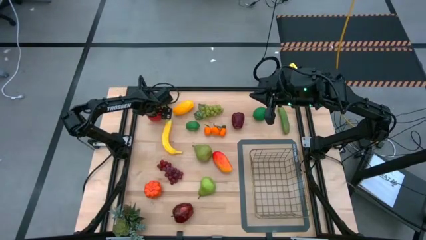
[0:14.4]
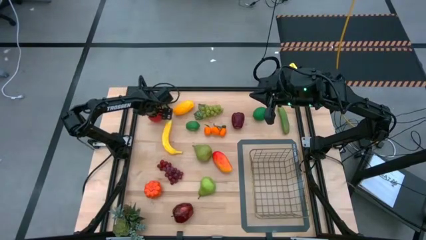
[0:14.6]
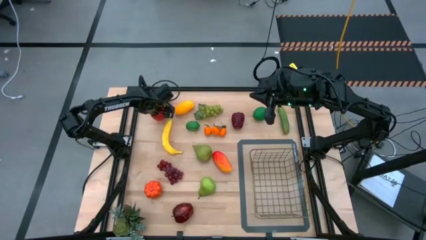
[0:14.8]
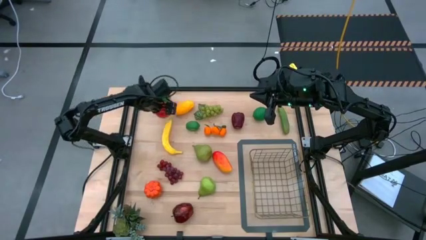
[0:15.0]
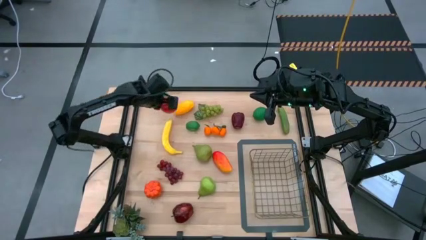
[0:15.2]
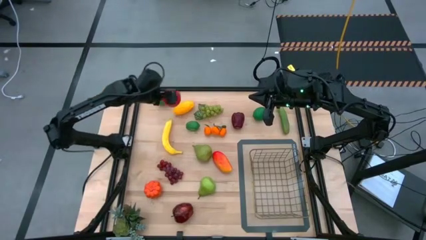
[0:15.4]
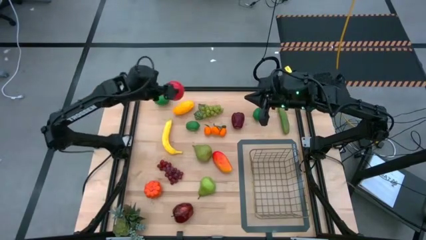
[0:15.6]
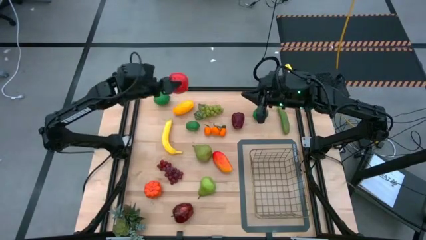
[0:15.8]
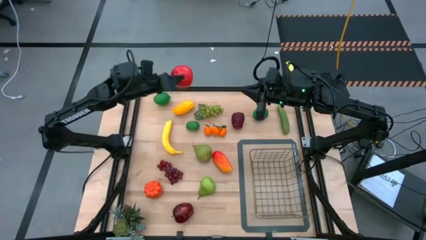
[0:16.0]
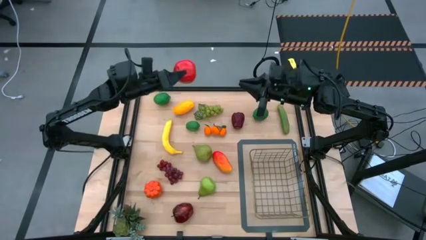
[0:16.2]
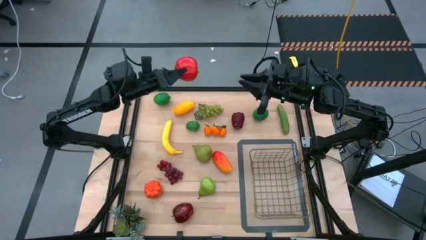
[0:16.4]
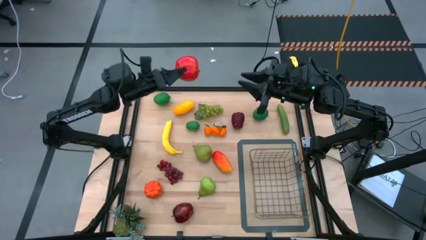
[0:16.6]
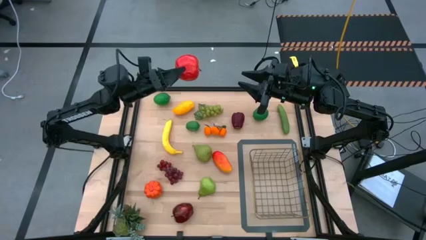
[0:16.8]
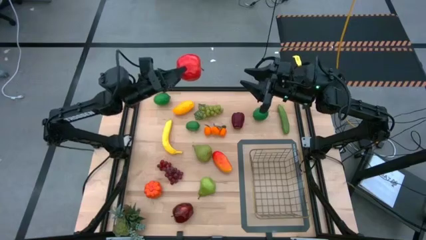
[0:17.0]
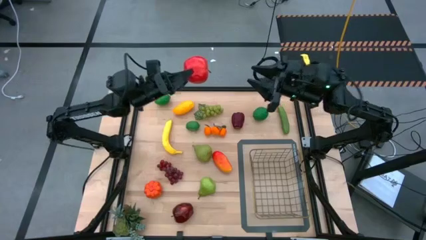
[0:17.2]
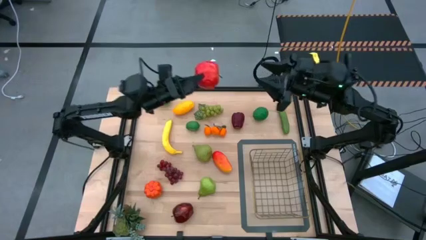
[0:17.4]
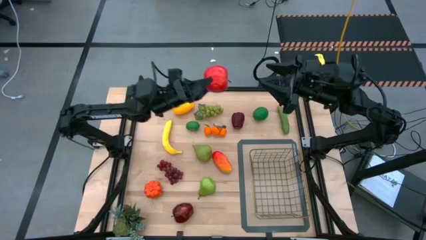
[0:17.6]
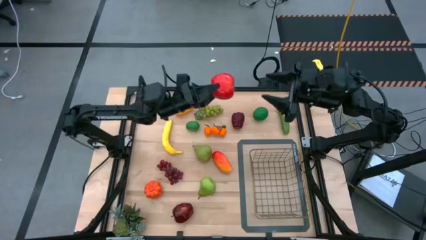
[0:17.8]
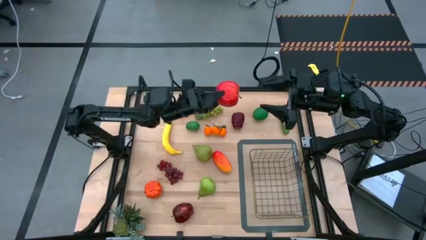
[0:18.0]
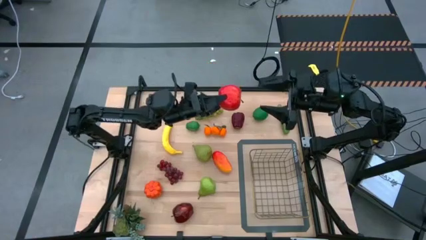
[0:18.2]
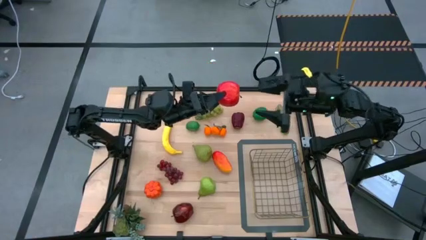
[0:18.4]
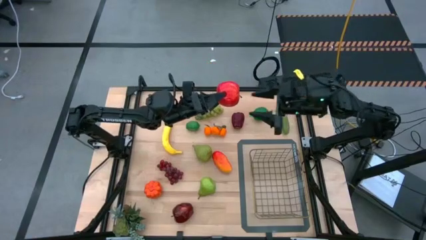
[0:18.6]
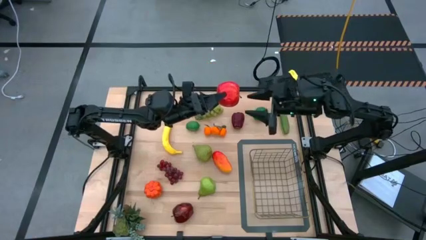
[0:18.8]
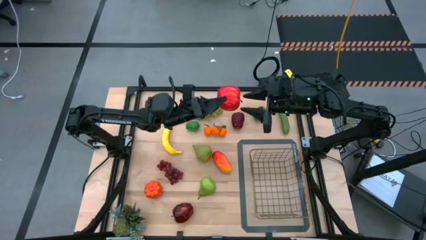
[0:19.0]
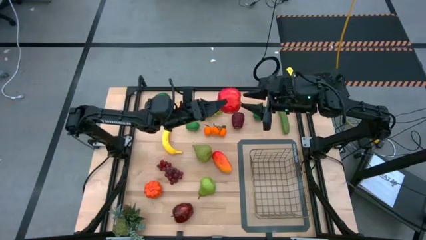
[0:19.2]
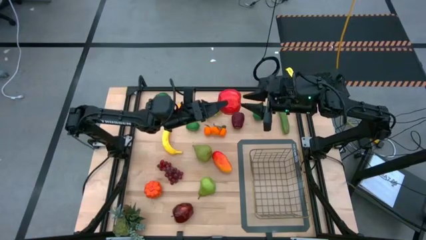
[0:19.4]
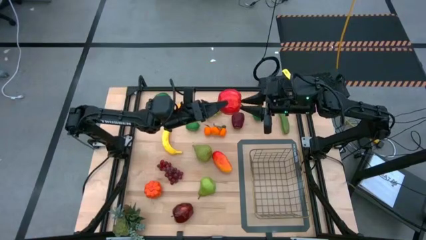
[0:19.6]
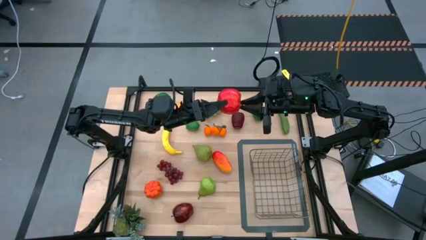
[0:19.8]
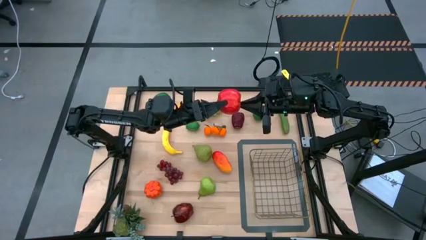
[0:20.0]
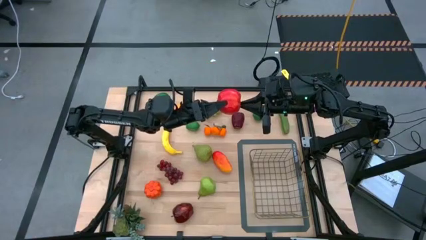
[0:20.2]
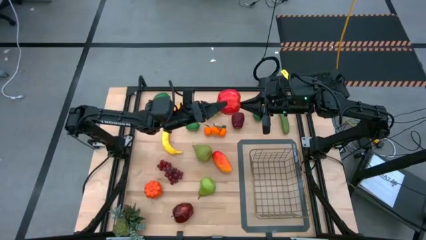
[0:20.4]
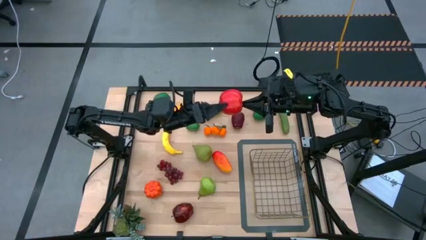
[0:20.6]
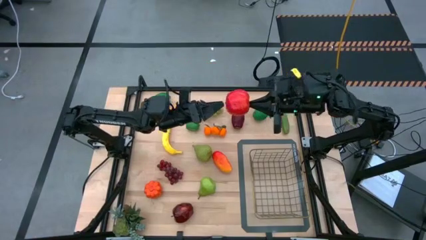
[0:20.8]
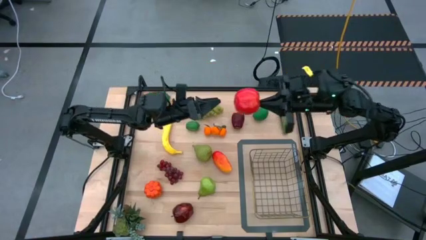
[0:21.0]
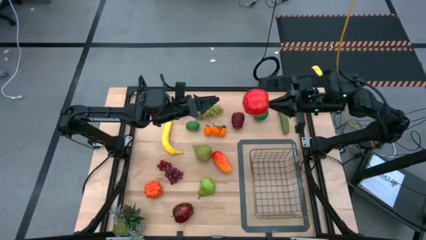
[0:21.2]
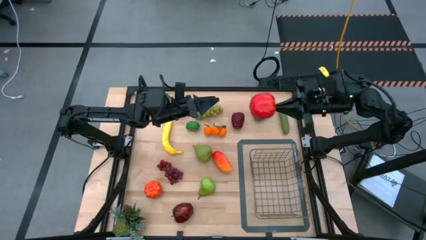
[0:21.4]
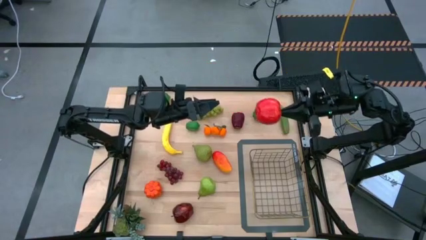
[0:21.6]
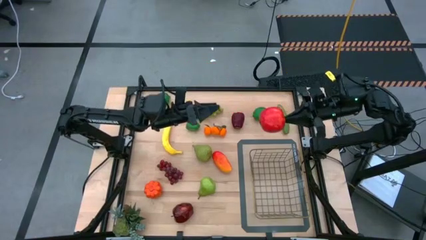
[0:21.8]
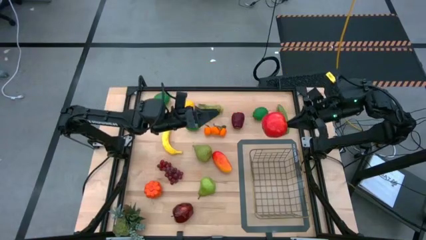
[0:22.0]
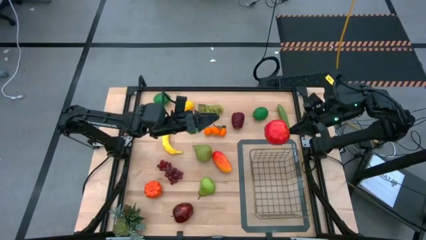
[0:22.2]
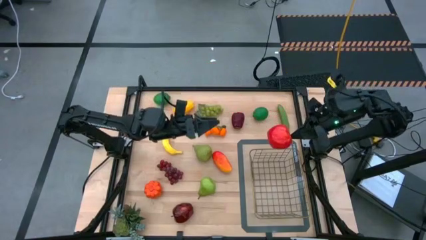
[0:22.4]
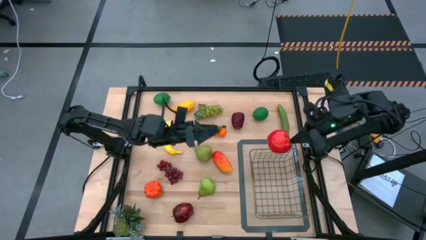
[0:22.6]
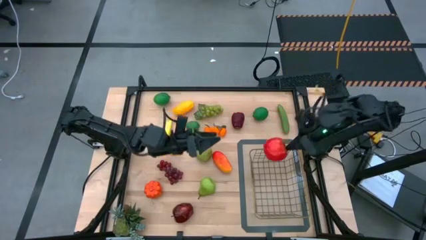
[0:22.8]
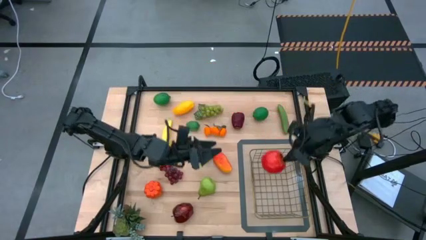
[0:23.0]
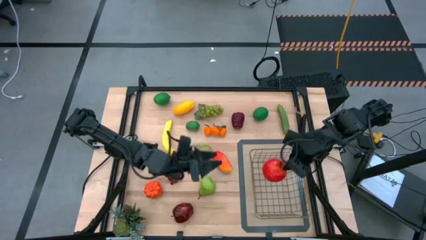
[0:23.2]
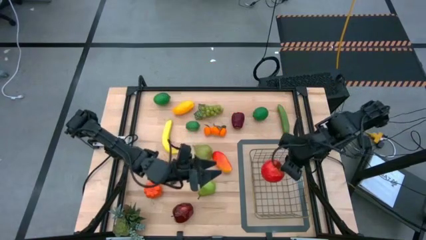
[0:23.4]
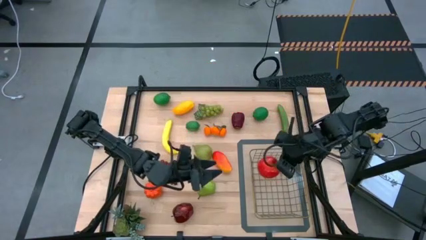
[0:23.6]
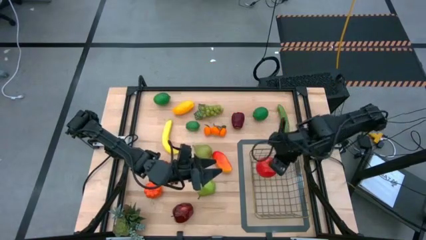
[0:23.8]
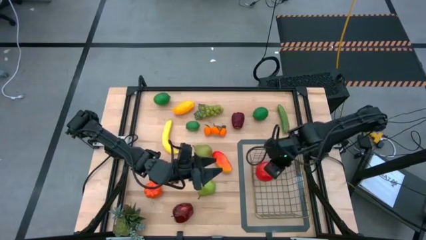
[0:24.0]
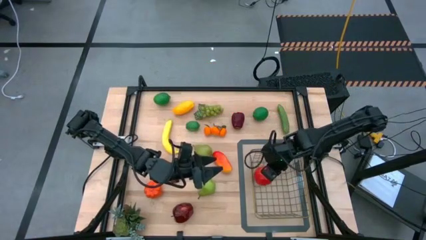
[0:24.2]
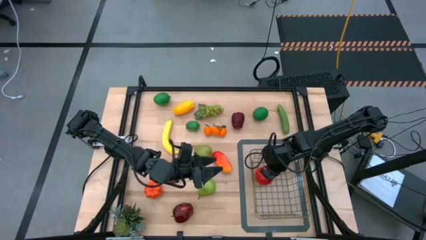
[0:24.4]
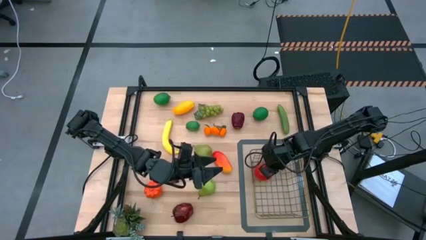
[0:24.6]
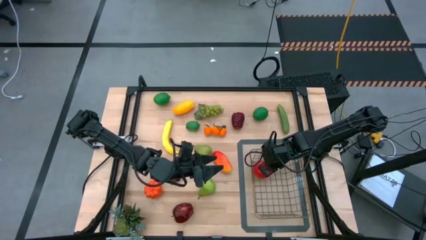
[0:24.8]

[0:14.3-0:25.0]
Task: Build produce basket
Put the red apple into the wire basket

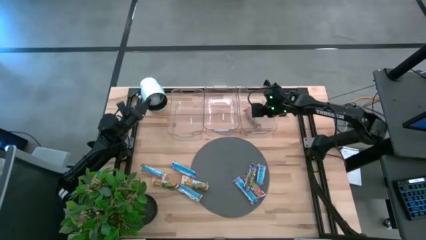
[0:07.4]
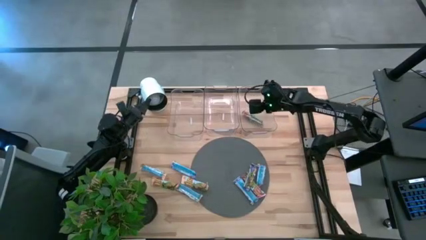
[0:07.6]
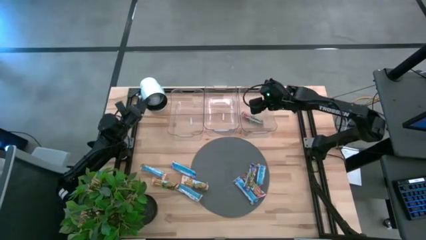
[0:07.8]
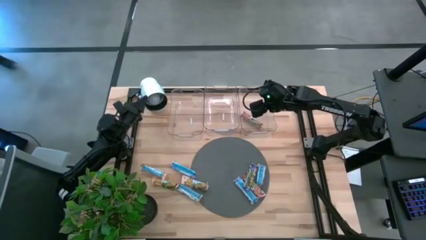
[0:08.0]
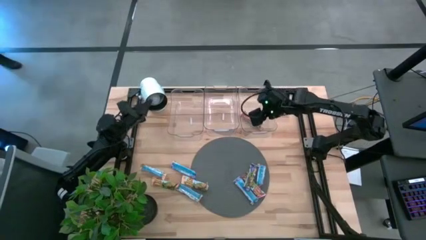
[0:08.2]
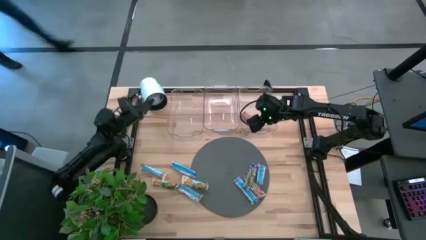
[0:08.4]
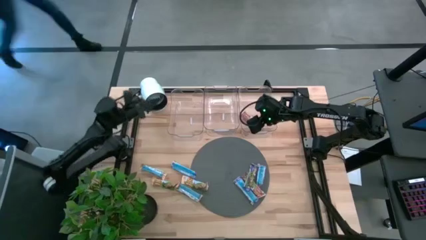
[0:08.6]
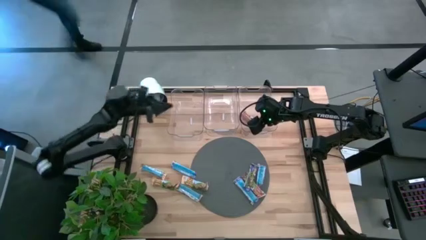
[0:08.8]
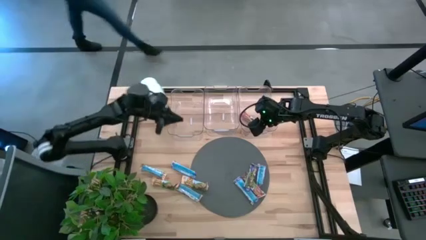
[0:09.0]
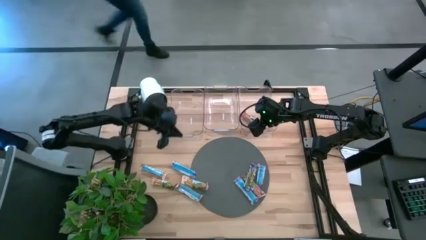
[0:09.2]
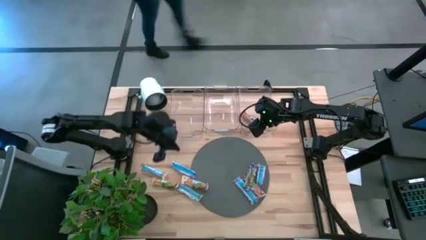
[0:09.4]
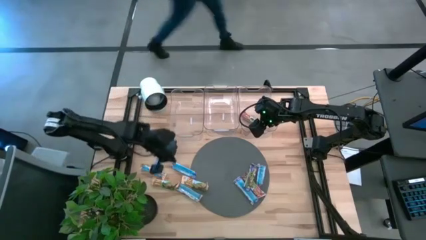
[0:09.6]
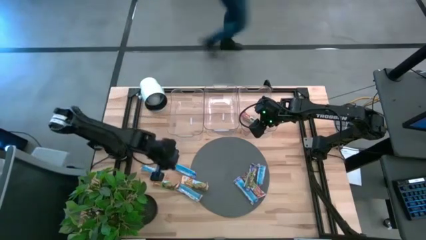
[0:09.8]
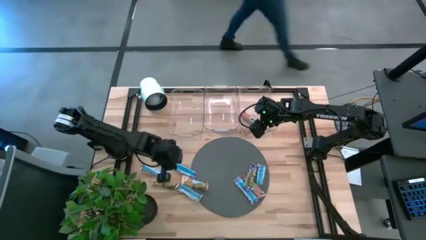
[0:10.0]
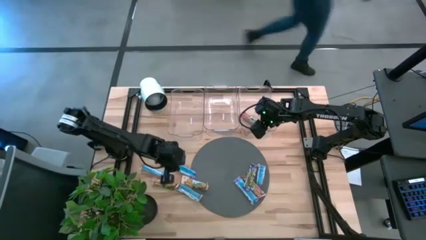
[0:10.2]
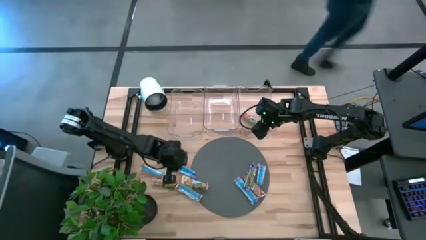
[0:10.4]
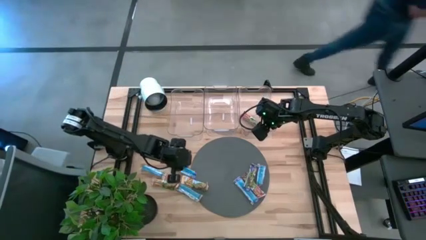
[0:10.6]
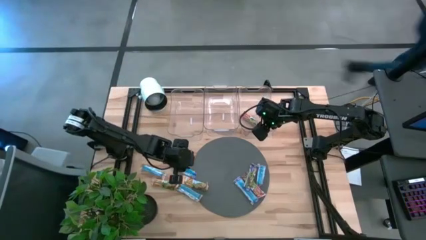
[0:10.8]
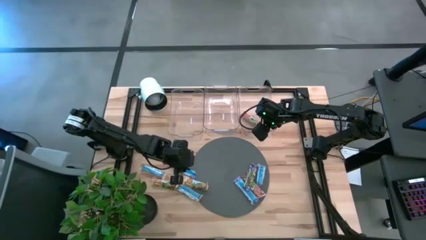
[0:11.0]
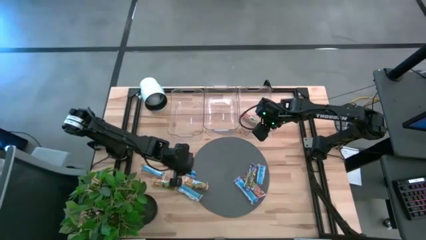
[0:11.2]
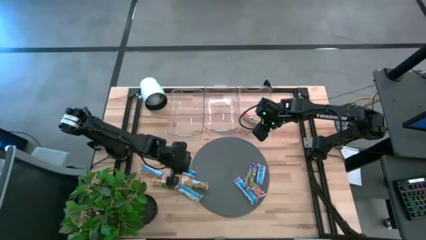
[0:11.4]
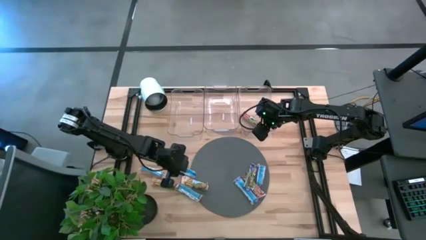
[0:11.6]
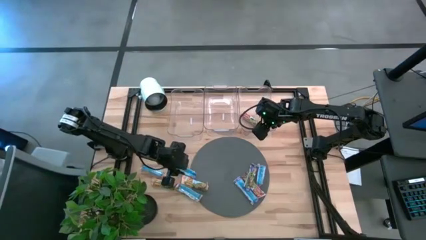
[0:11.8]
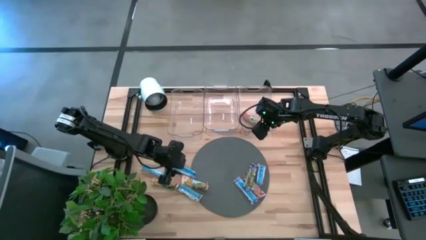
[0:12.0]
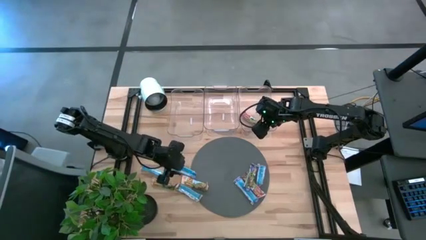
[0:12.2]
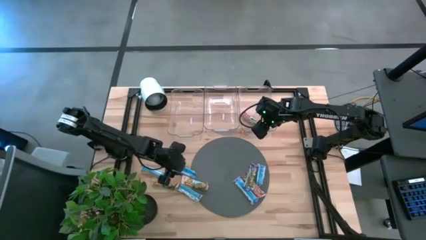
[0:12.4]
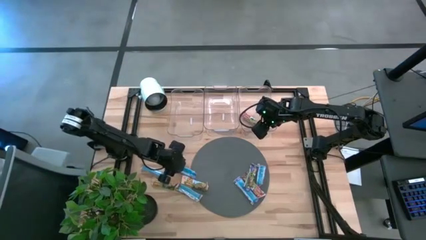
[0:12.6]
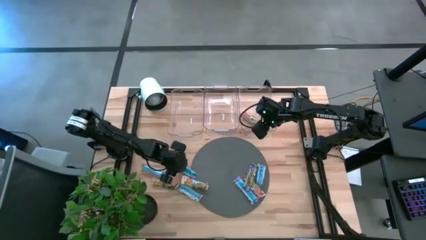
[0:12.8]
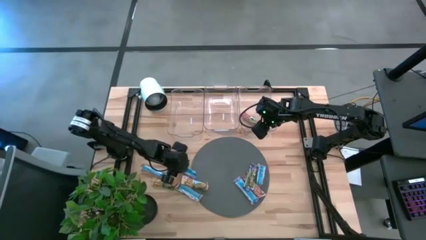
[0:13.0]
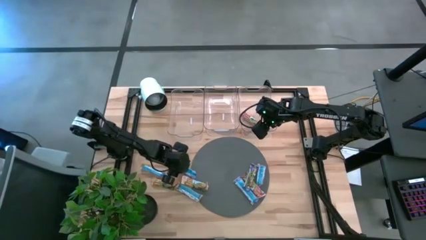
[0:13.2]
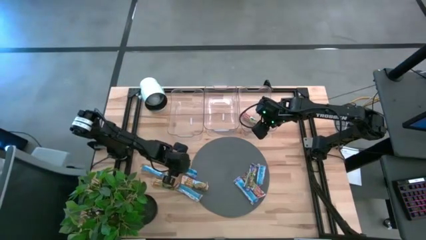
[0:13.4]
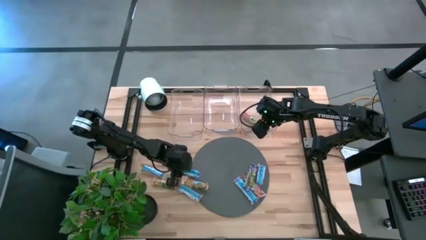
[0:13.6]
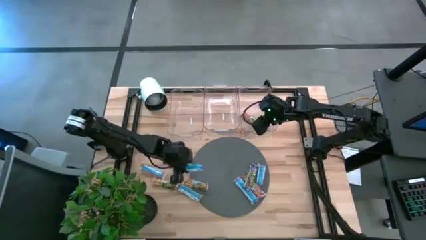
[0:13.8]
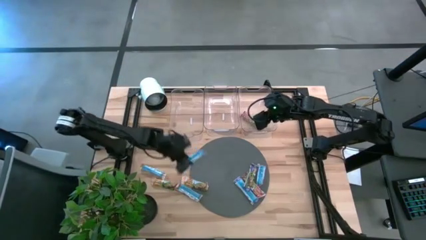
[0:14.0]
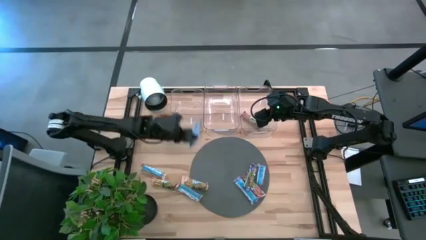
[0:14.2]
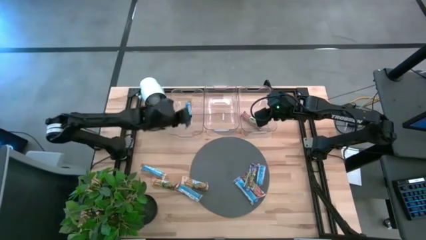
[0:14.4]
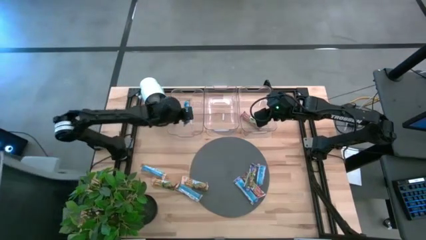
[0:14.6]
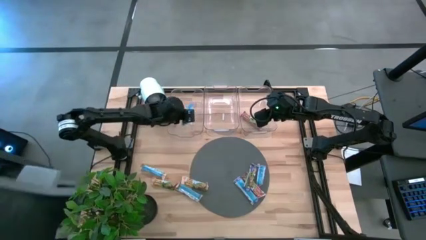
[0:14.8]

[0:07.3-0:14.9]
Task: Pick and place Granola Bars by type
Put the blue granola bar into the left bin
